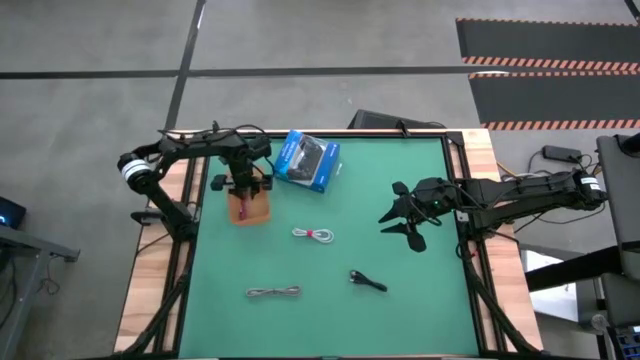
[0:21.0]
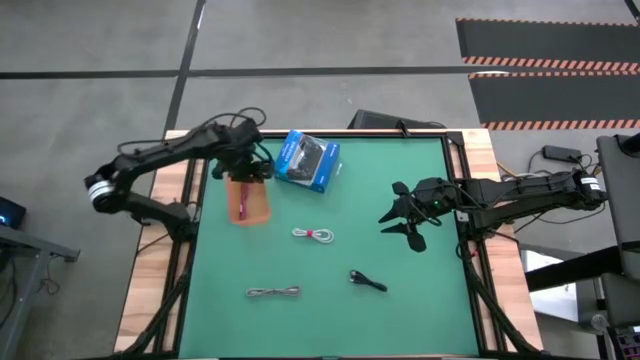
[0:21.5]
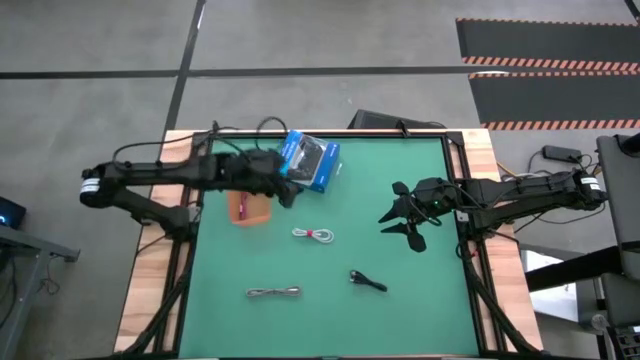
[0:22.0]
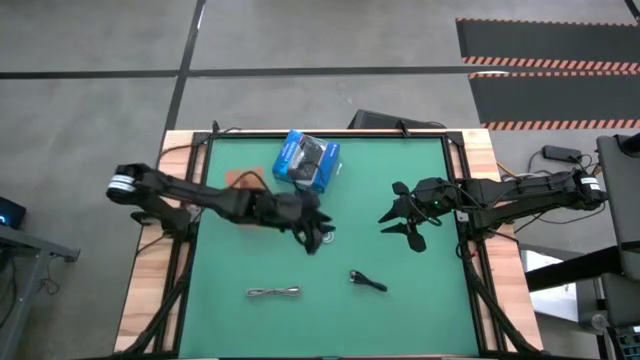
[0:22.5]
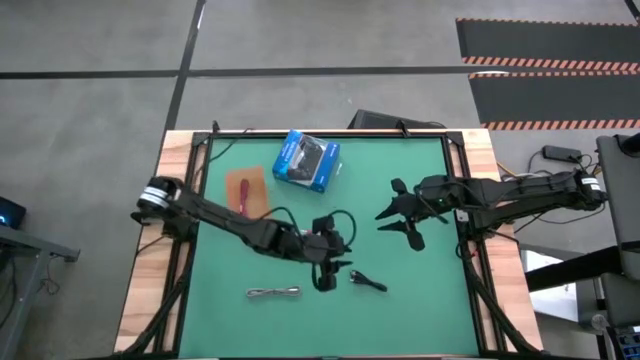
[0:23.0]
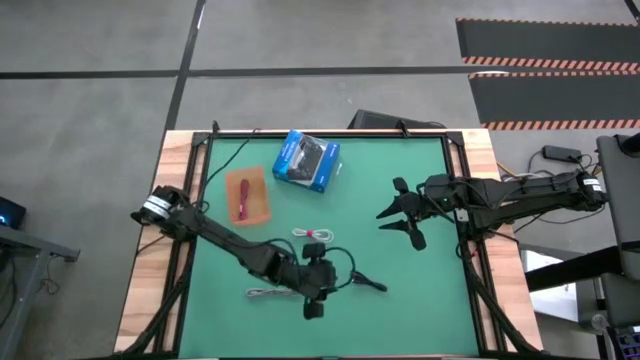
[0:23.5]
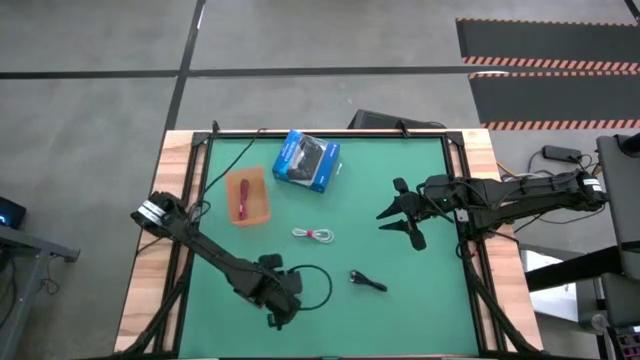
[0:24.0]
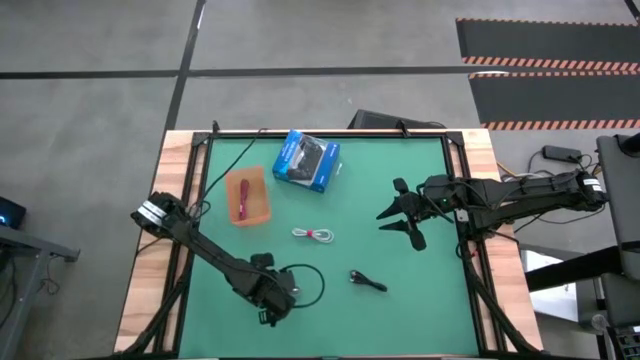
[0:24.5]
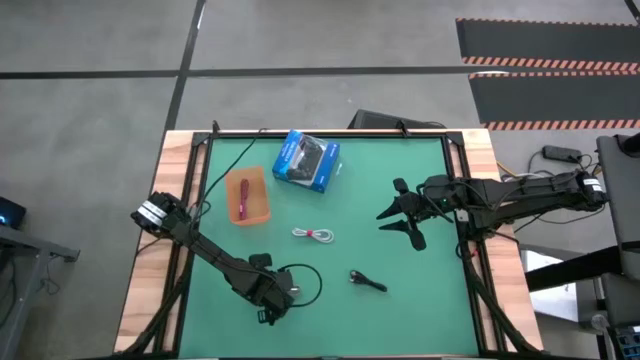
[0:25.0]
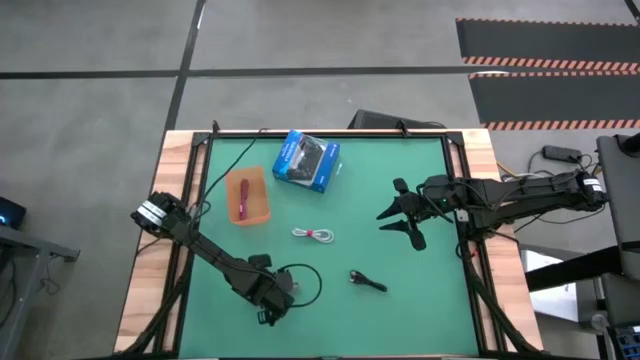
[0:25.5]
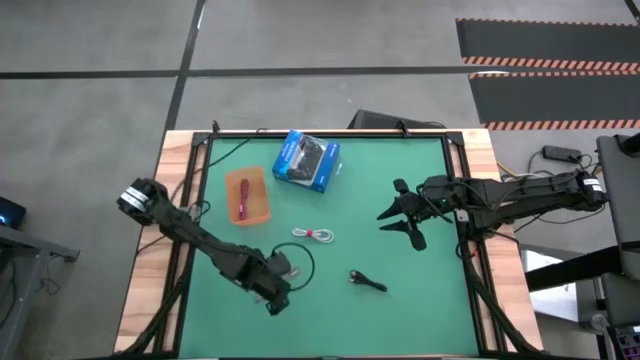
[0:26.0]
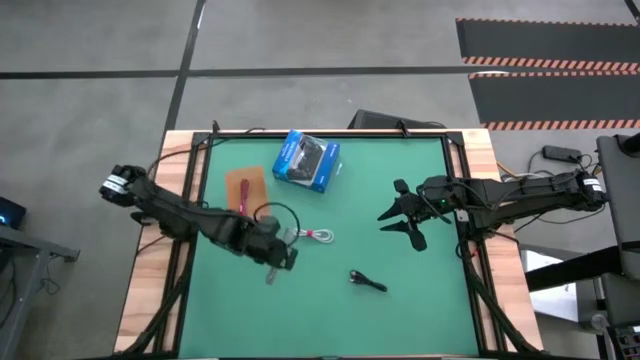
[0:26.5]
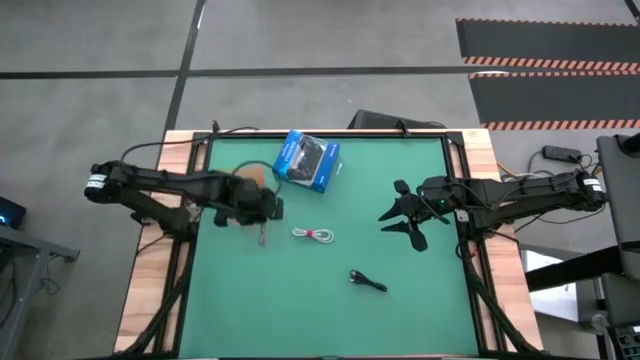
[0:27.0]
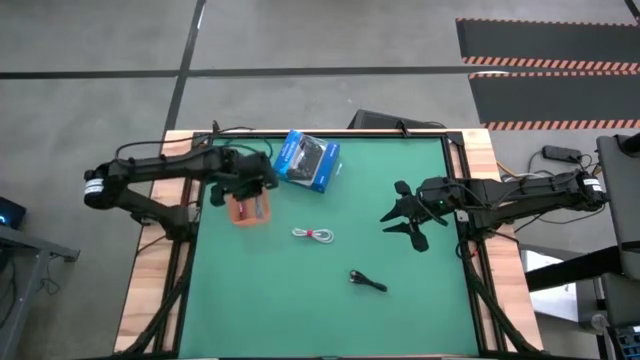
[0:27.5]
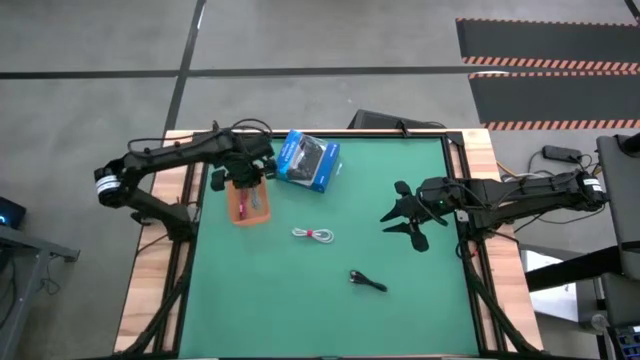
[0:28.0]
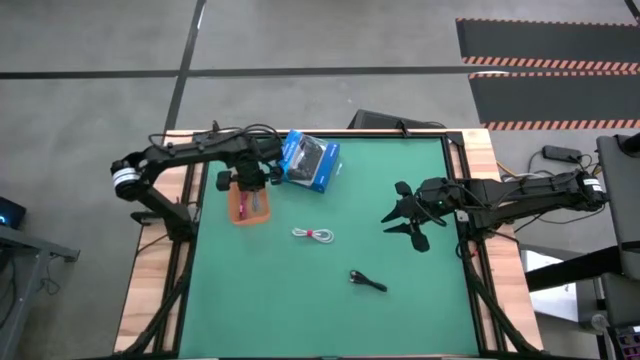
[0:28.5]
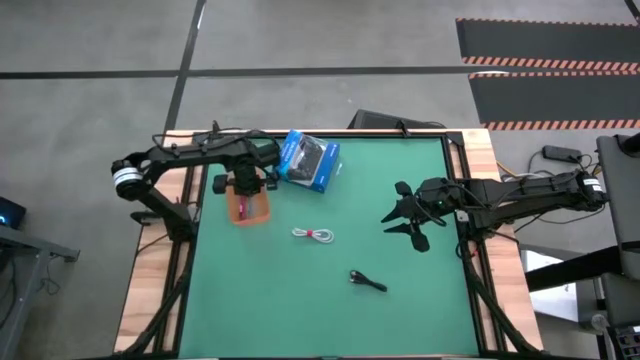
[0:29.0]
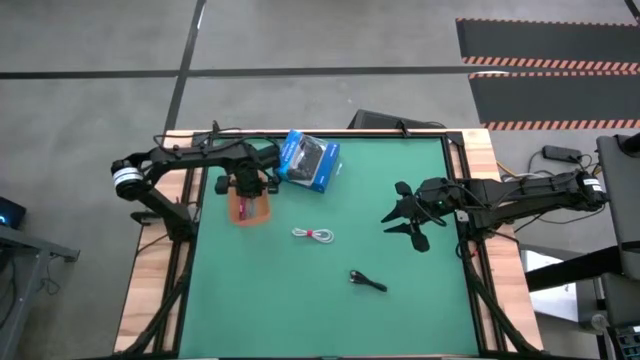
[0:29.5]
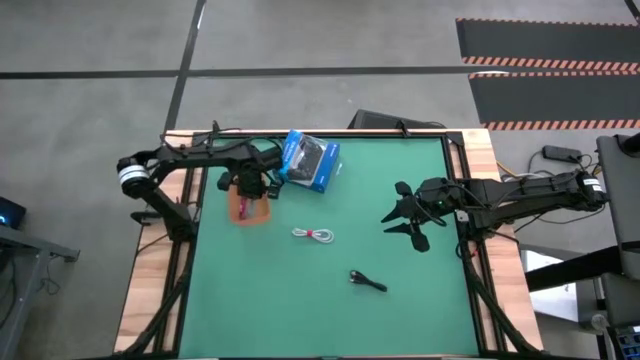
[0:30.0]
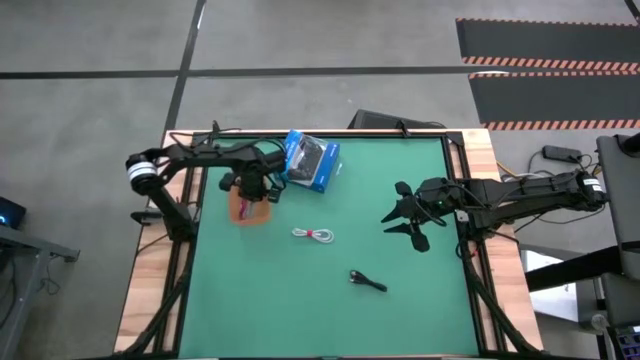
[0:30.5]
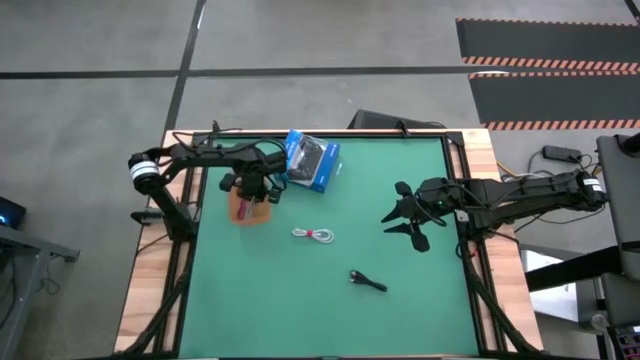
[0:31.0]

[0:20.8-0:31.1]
Task: Pick and place USB-C Cables
Put the white and black charger cable into the orange bin

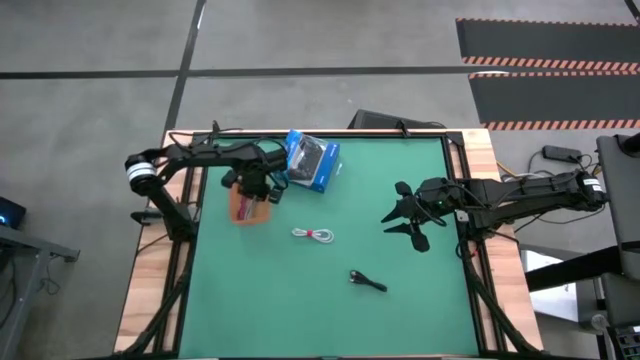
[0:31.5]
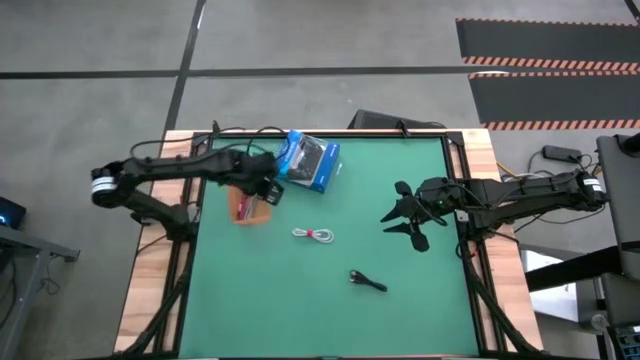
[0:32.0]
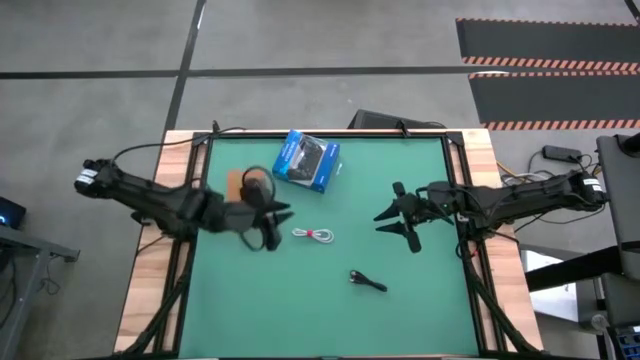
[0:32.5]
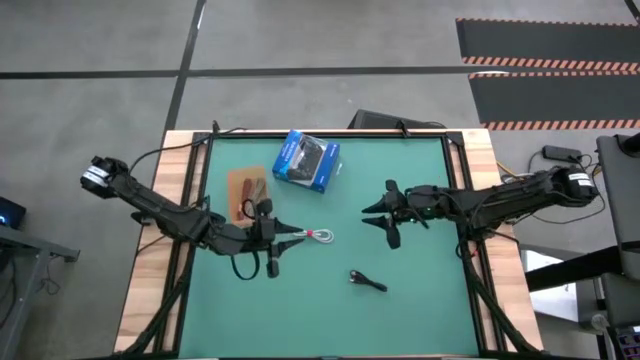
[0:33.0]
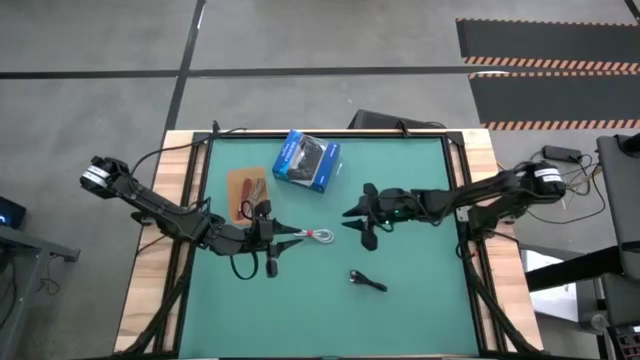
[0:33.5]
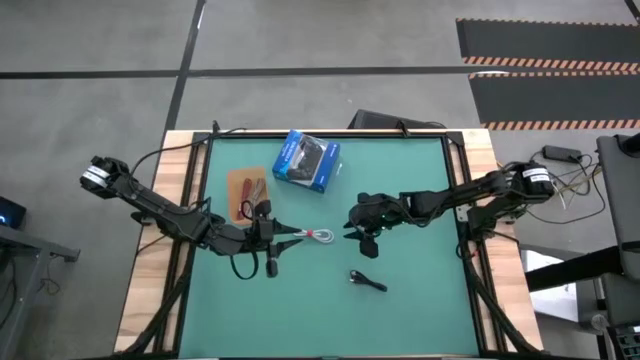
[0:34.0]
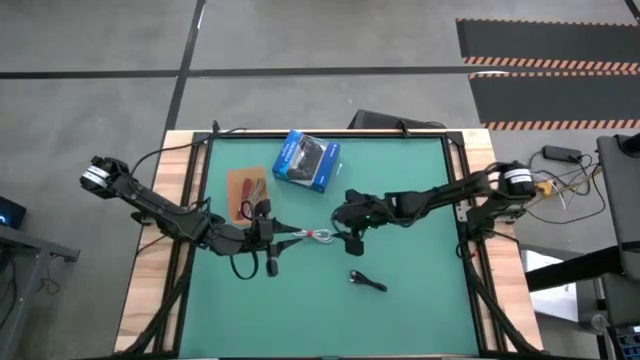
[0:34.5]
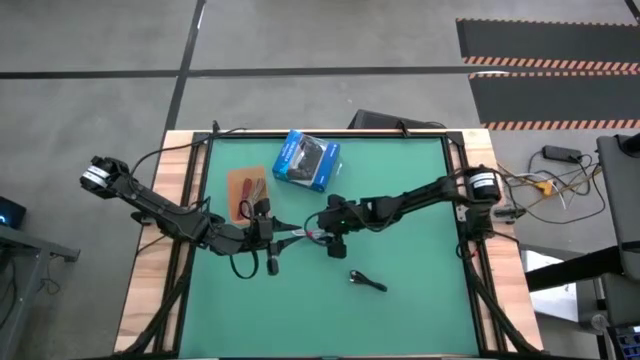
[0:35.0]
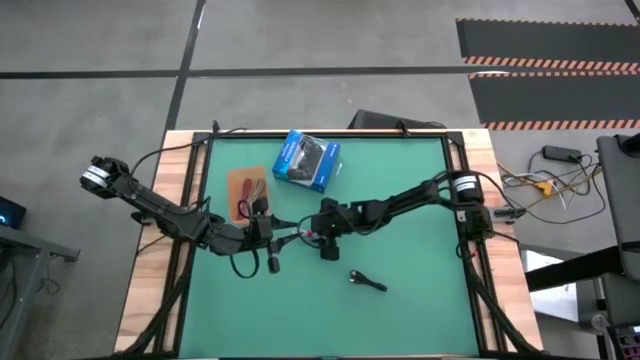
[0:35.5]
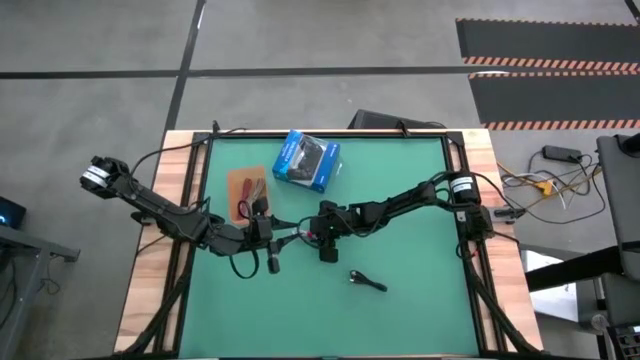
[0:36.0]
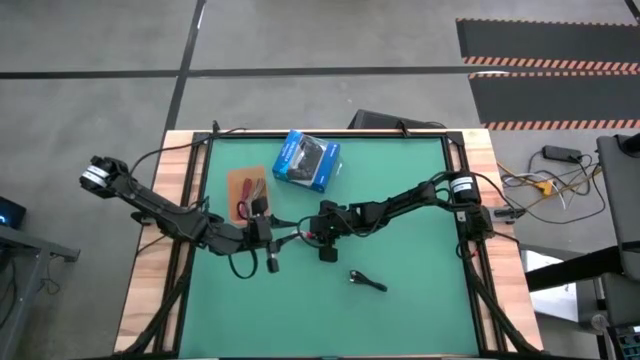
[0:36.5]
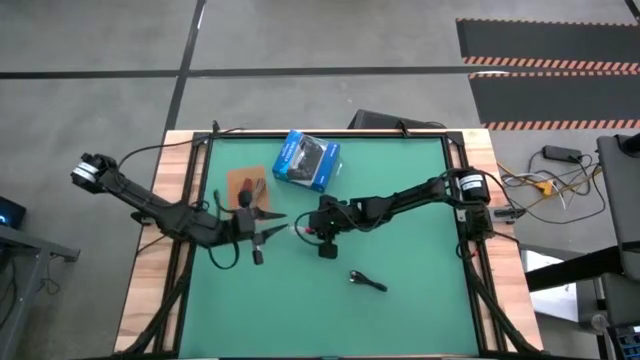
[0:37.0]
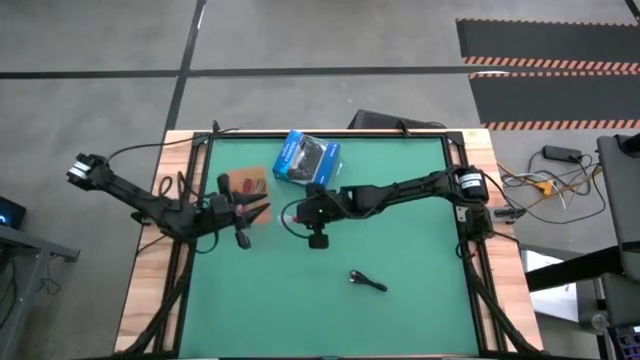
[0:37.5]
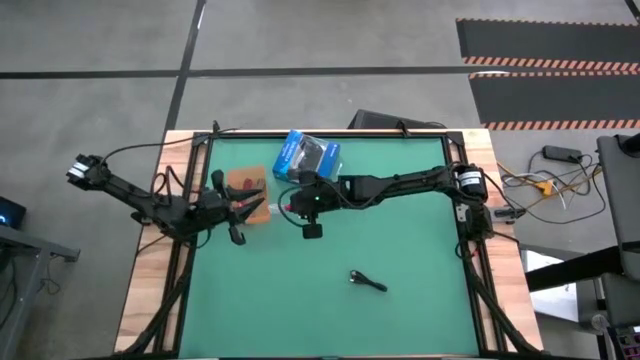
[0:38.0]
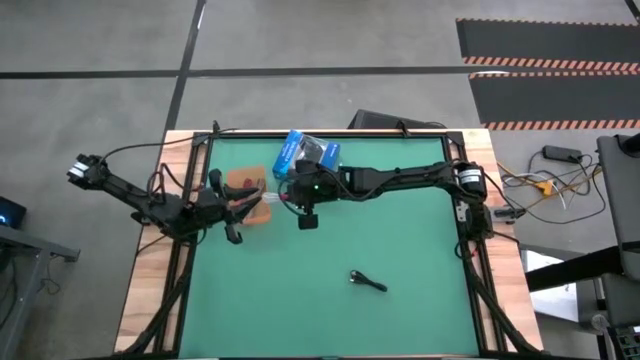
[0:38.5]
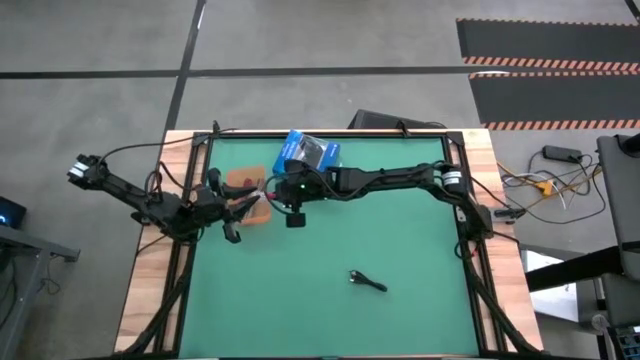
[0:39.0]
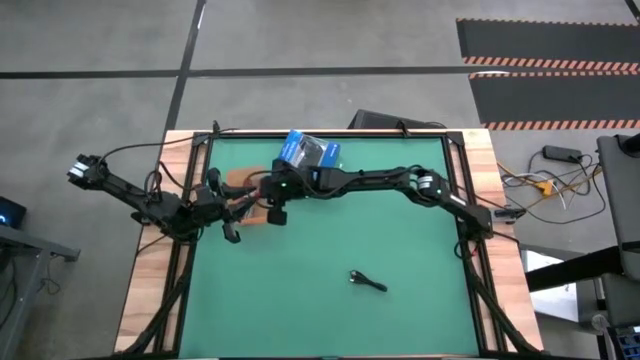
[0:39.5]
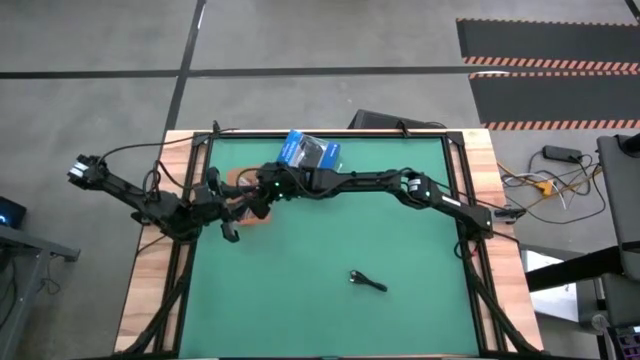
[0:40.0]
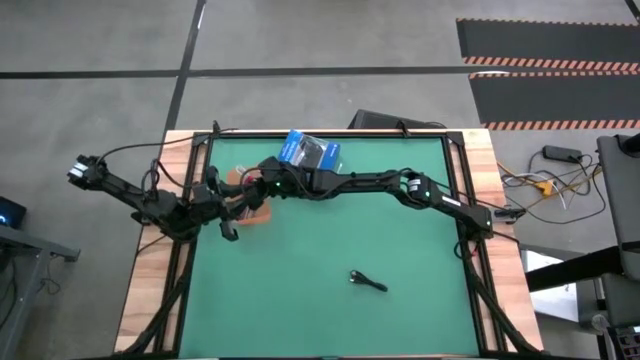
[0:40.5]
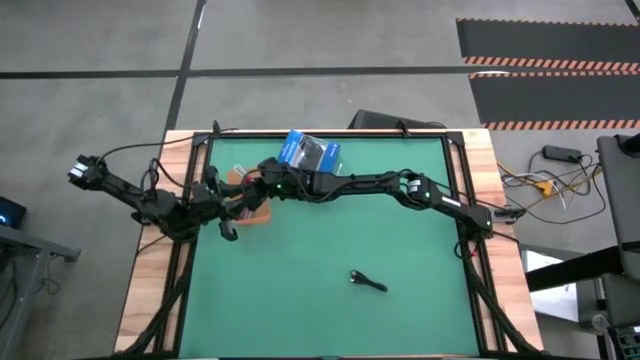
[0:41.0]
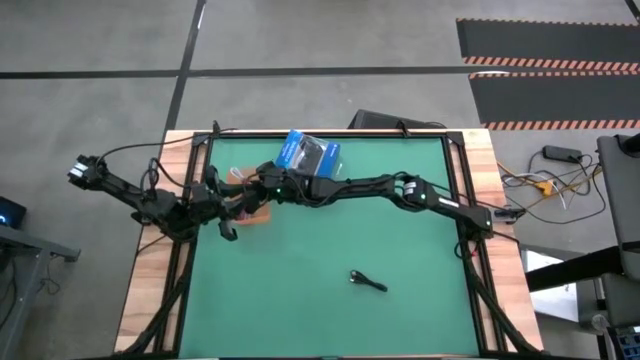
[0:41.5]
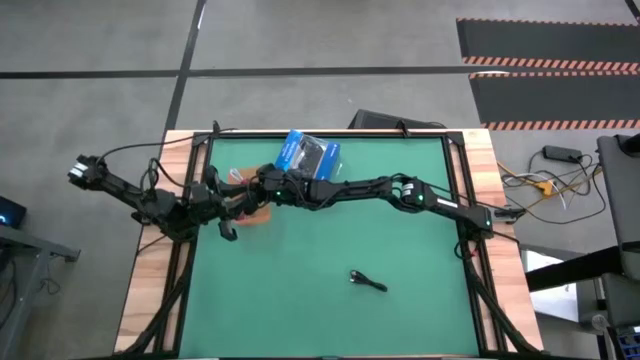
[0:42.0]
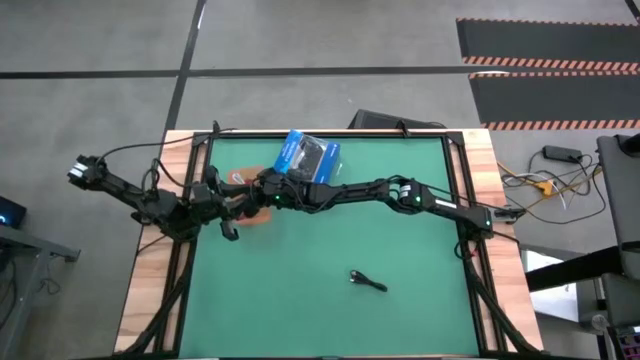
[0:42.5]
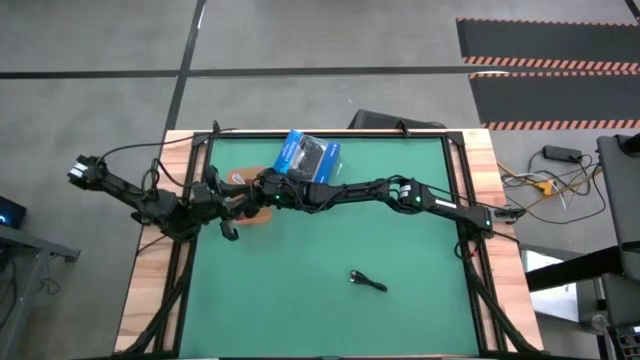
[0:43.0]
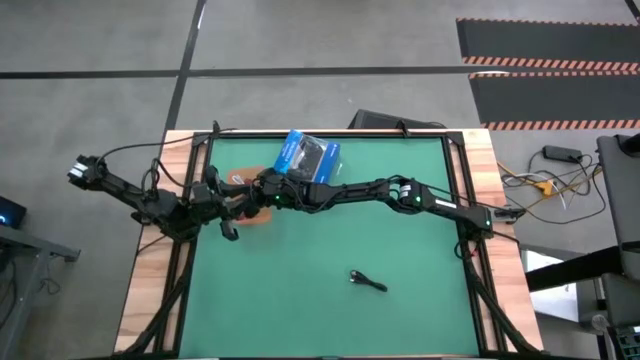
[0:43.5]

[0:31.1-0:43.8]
Put the white charger cable into the orange bin
